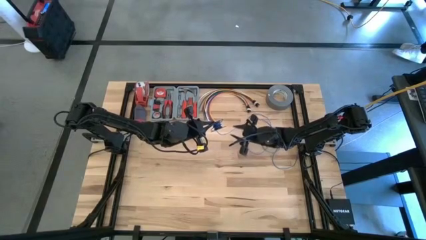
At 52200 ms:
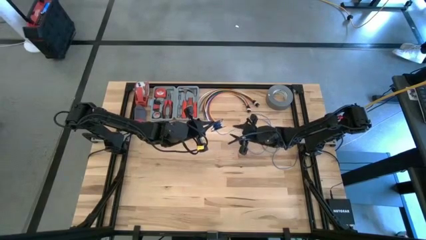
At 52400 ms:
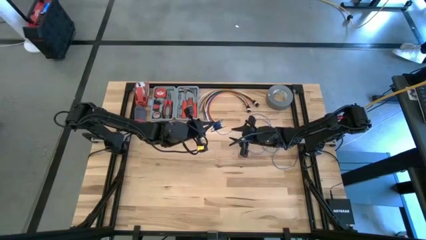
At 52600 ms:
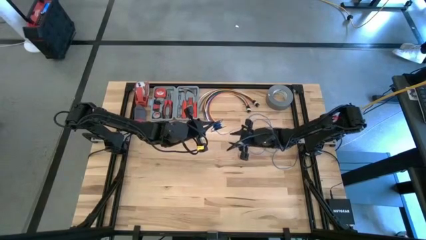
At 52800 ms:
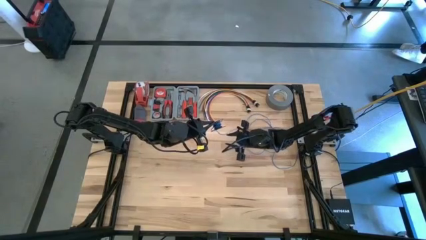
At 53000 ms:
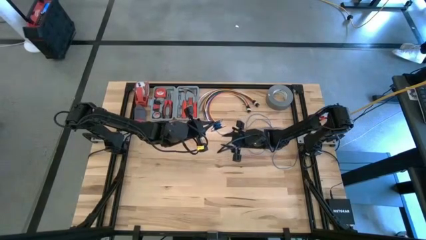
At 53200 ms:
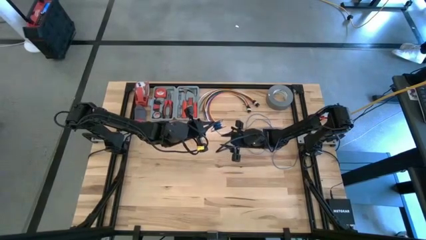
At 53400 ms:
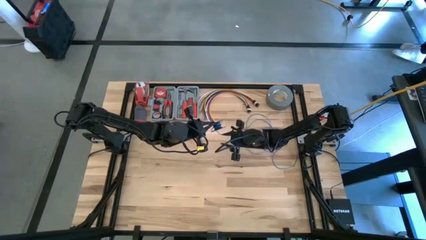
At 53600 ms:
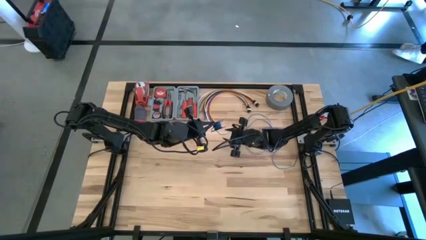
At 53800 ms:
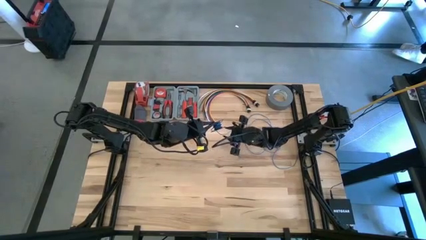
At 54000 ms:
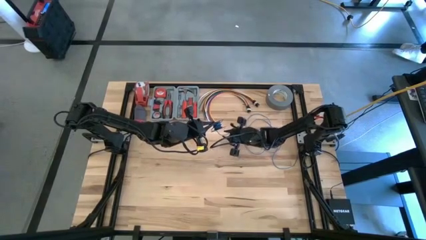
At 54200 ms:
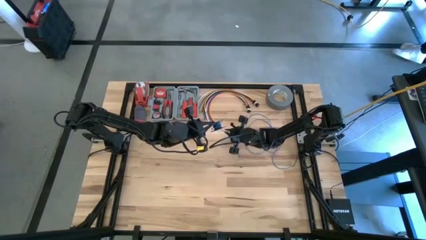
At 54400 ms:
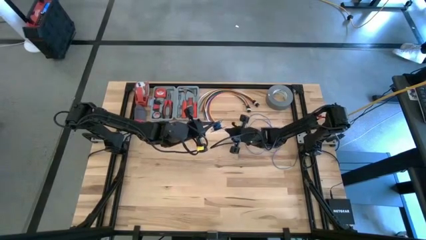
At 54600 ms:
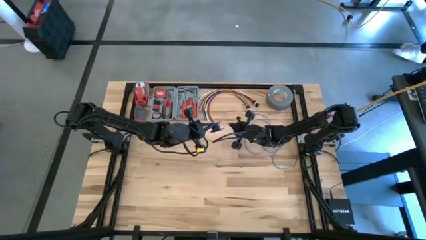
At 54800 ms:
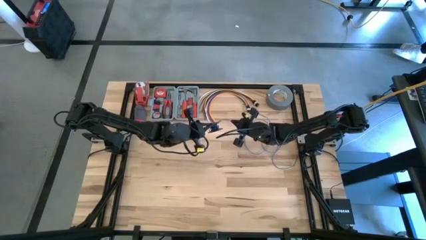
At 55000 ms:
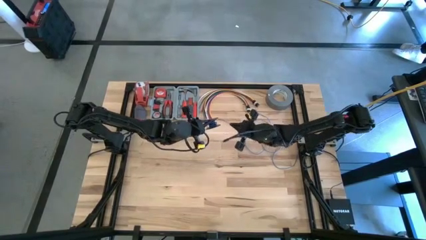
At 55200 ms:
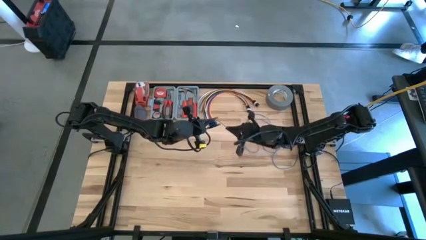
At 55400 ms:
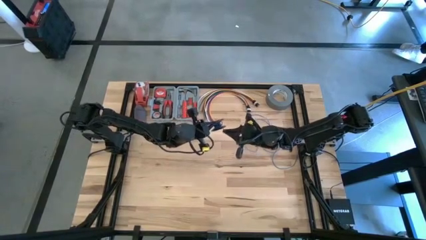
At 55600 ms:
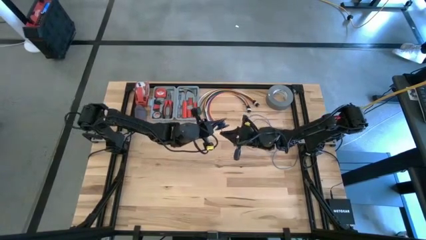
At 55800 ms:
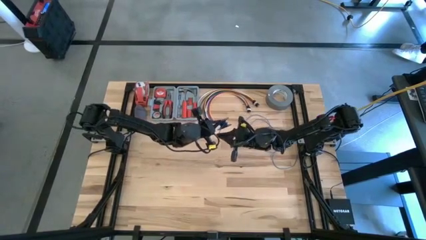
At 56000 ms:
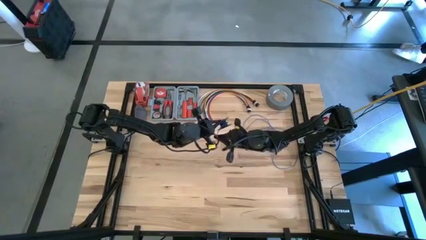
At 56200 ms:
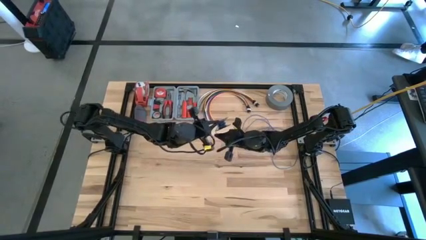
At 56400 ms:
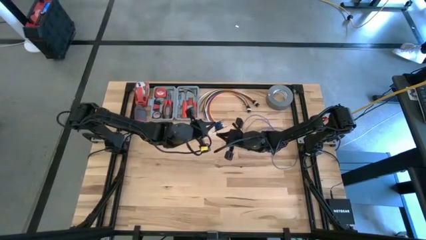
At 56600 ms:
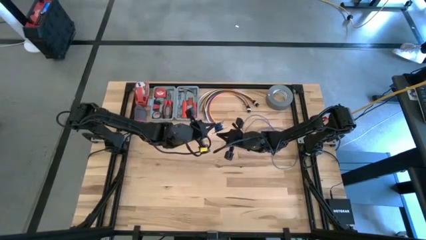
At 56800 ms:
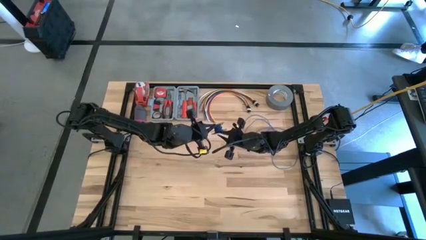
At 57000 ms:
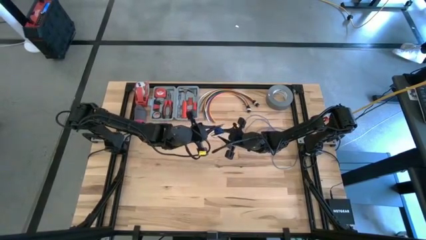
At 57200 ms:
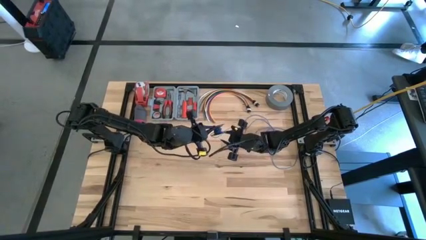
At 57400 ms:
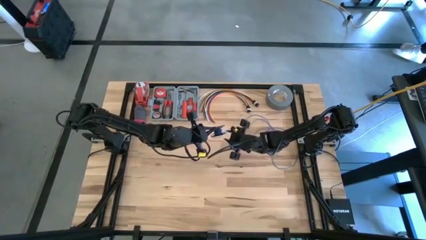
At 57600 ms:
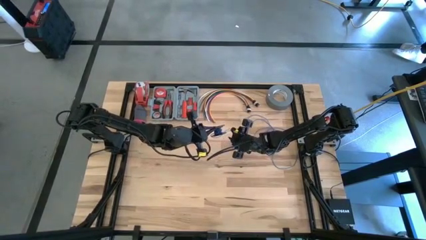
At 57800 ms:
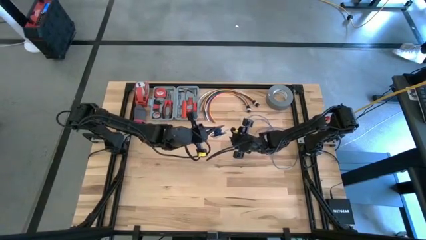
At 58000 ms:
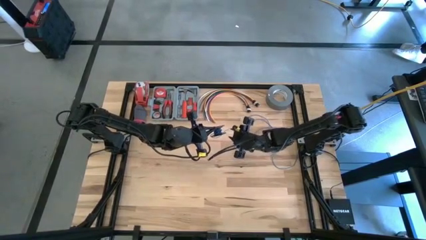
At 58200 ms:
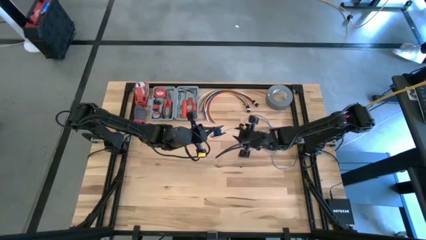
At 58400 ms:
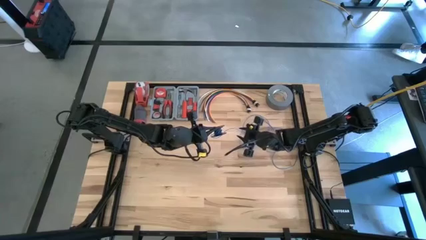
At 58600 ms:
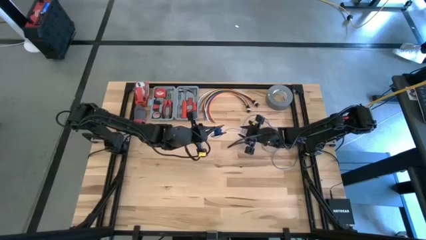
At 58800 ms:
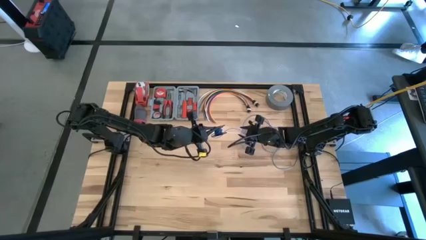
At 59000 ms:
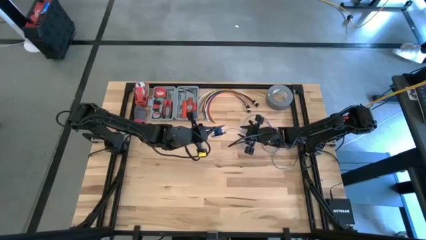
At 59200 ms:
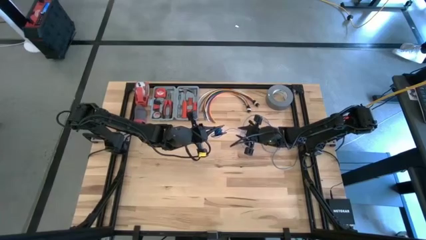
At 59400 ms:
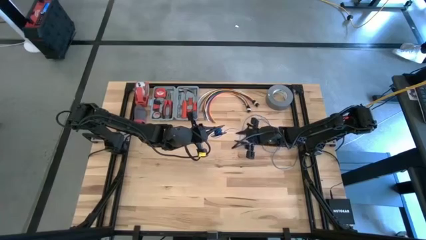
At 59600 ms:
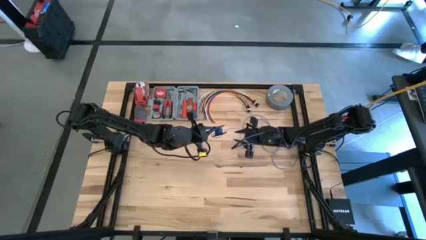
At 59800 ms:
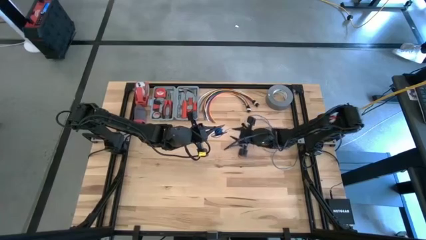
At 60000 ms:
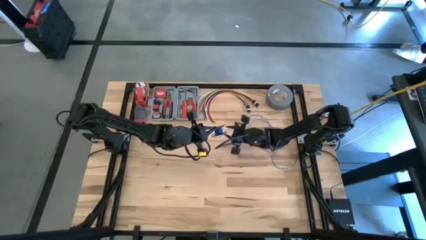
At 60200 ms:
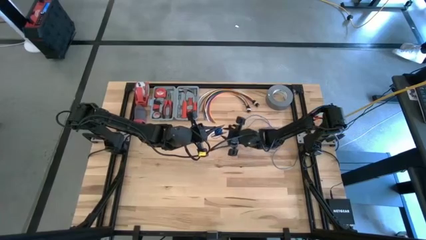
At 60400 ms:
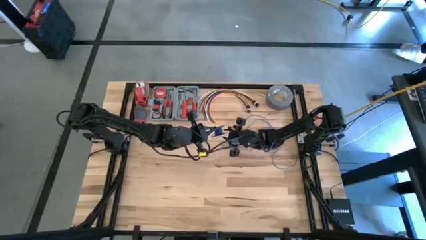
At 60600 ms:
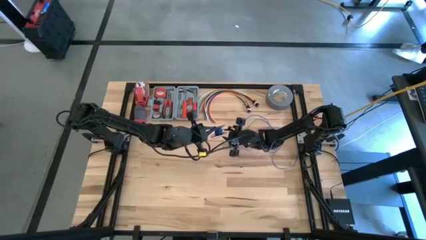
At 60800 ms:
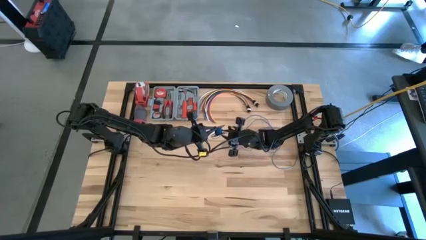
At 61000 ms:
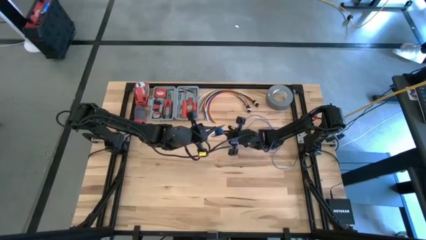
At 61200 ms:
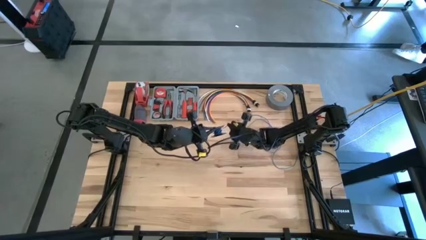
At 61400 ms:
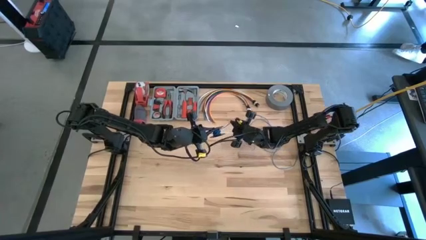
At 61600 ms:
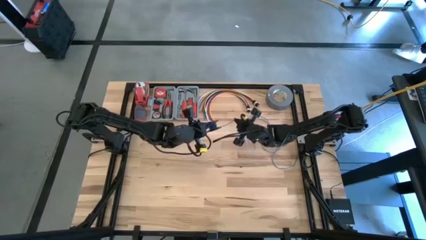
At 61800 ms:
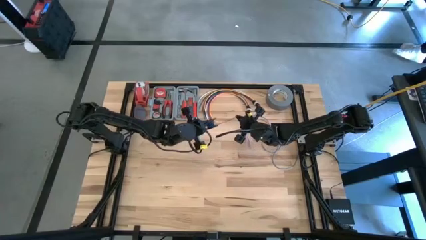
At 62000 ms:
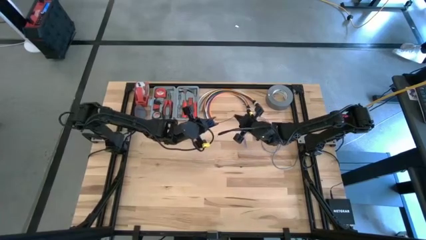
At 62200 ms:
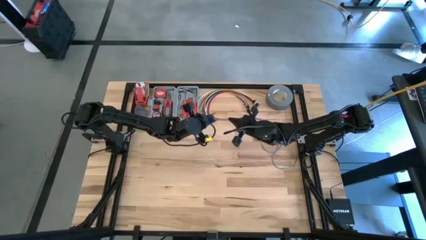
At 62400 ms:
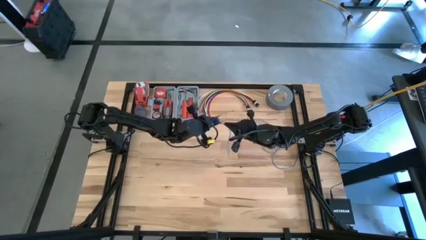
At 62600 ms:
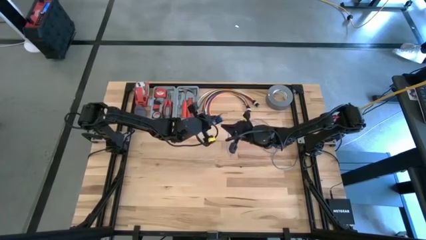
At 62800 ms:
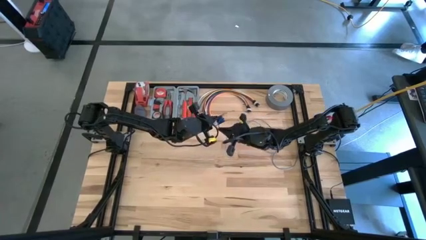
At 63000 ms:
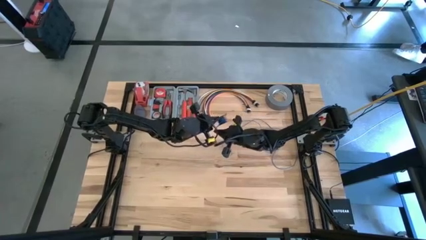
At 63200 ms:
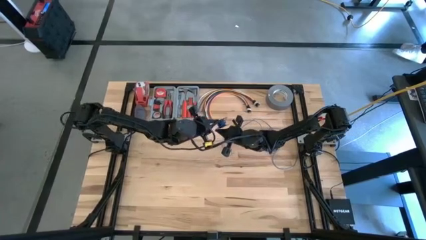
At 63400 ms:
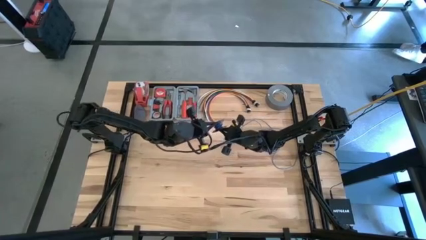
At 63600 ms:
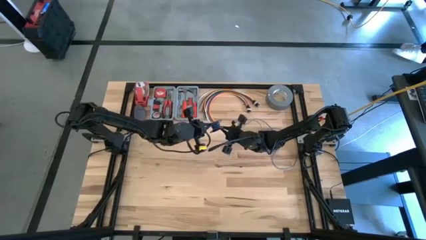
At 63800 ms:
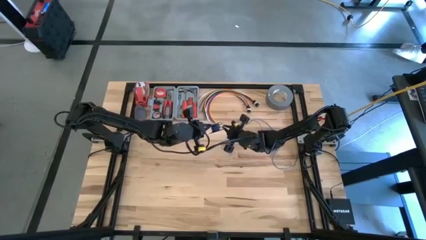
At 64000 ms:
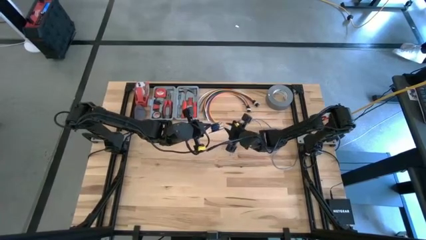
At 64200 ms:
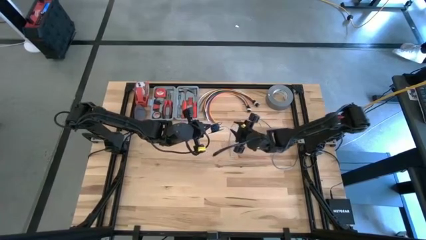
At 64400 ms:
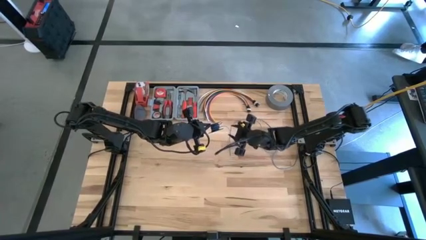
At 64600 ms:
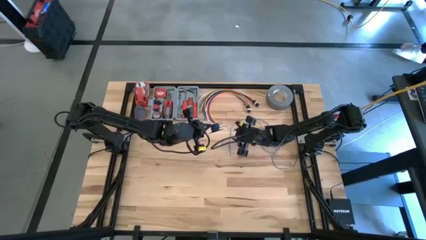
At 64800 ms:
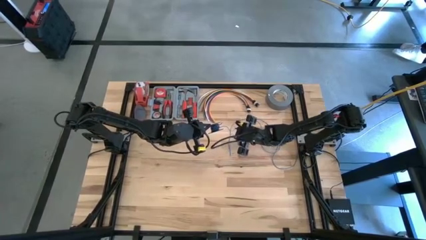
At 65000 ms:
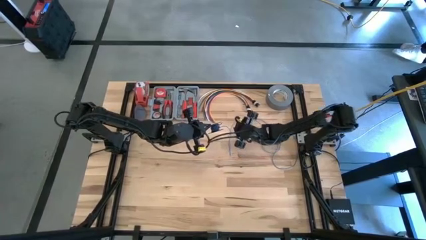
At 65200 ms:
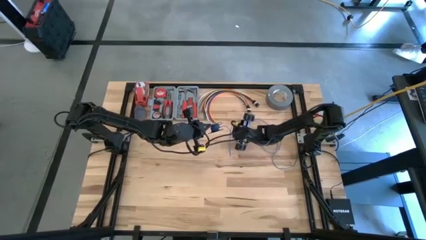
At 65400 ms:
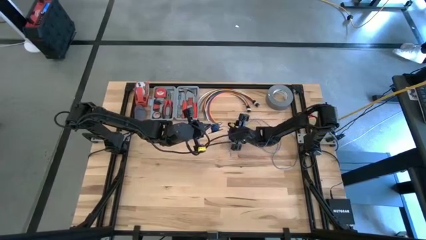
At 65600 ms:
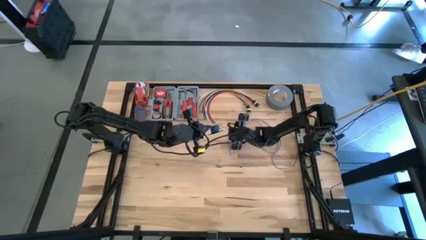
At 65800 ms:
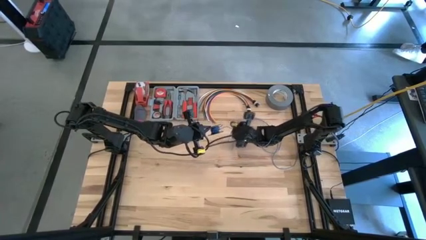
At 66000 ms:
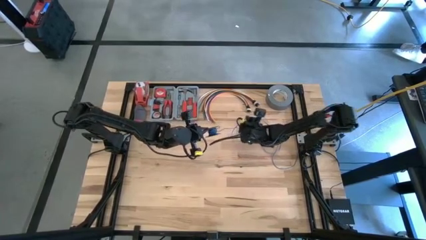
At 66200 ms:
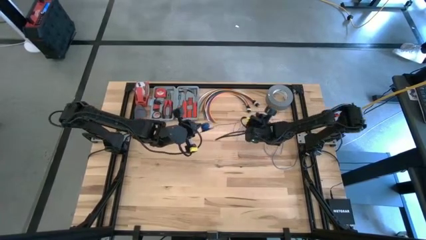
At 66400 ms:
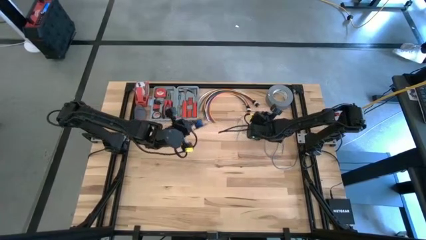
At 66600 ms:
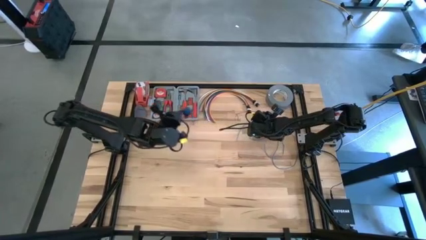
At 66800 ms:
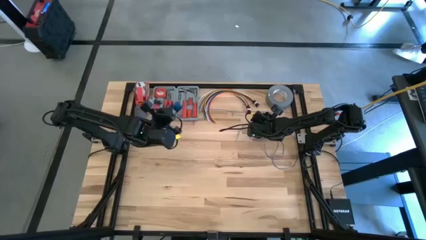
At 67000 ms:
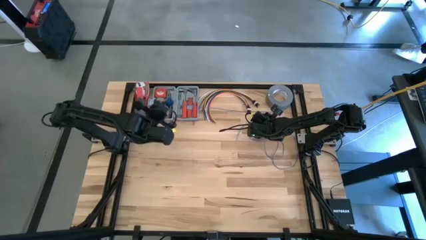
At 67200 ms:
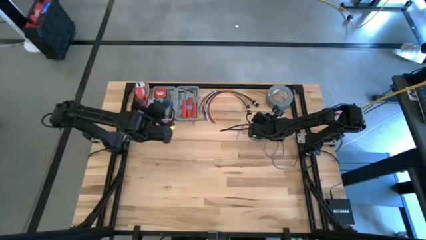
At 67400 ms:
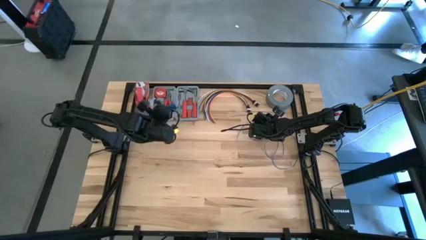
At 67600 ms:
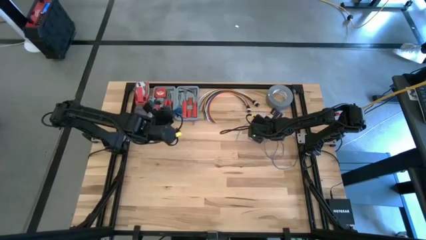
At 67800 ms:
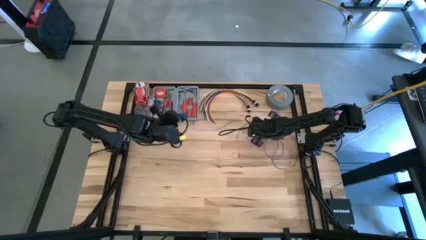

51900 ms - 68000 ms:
Task: Coil cords
Coil the blue wire onto the black spool
